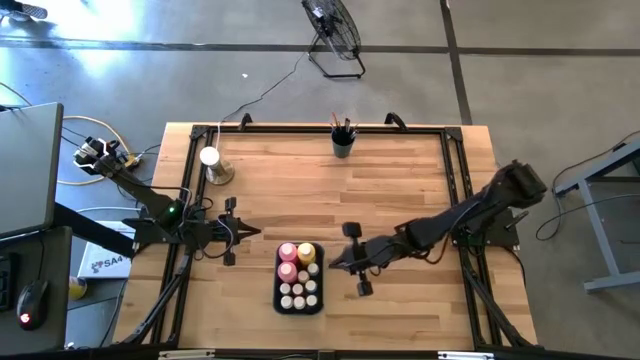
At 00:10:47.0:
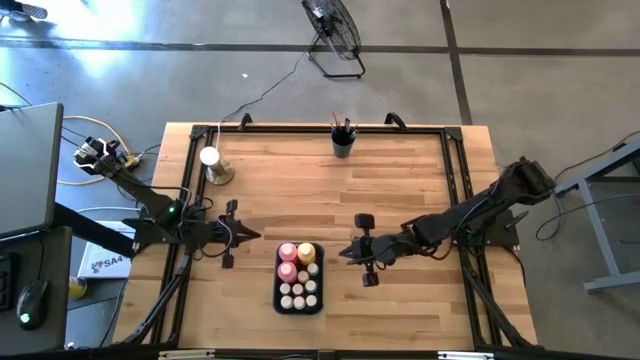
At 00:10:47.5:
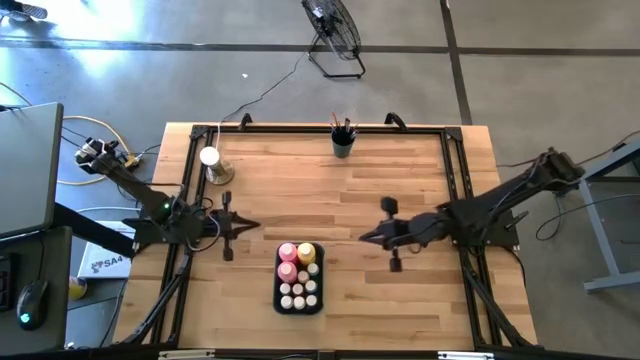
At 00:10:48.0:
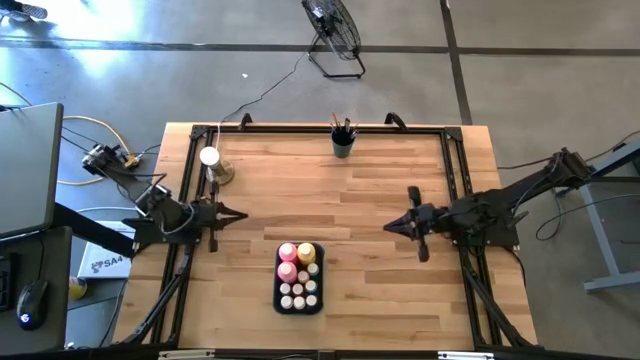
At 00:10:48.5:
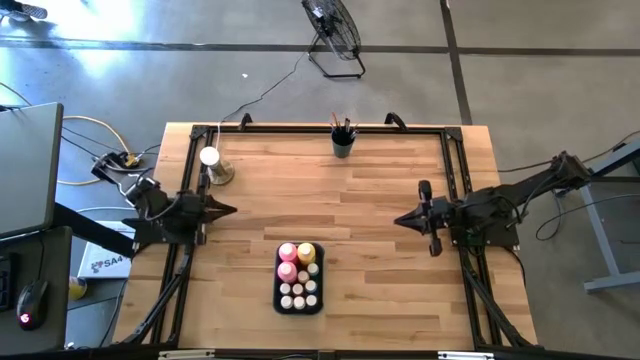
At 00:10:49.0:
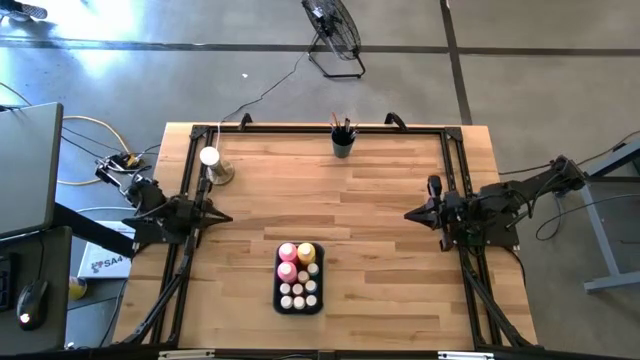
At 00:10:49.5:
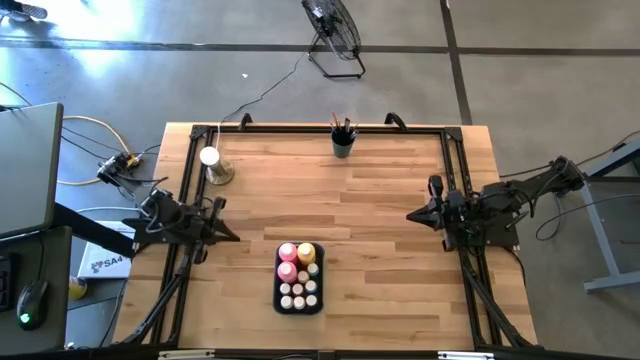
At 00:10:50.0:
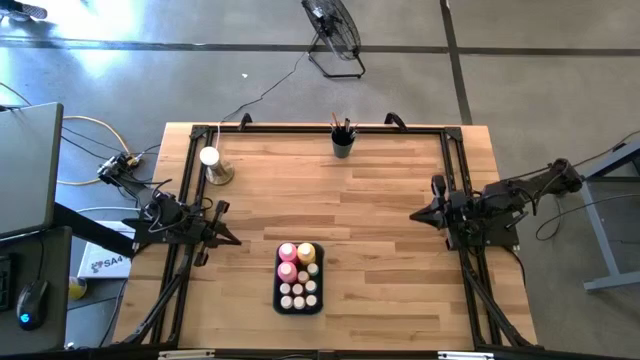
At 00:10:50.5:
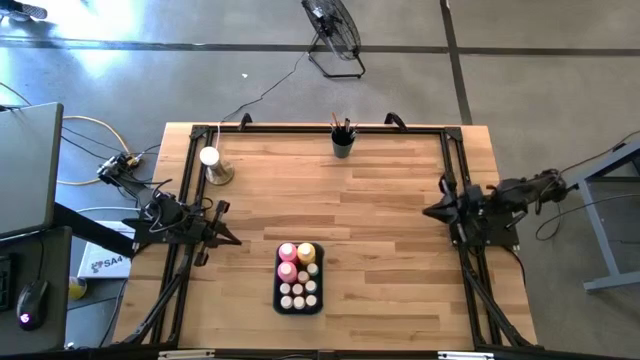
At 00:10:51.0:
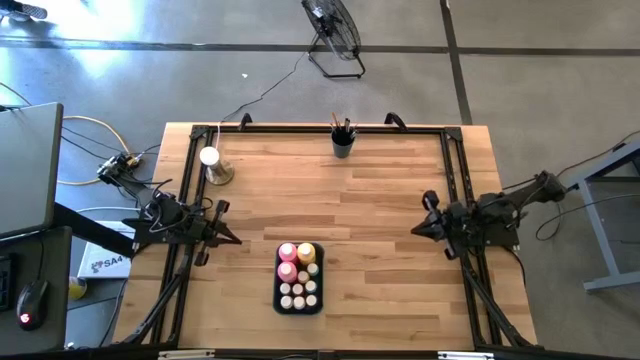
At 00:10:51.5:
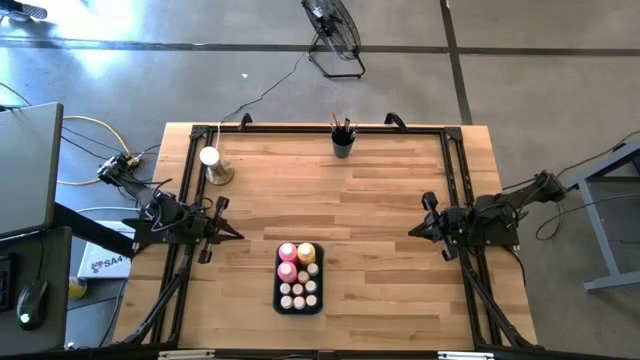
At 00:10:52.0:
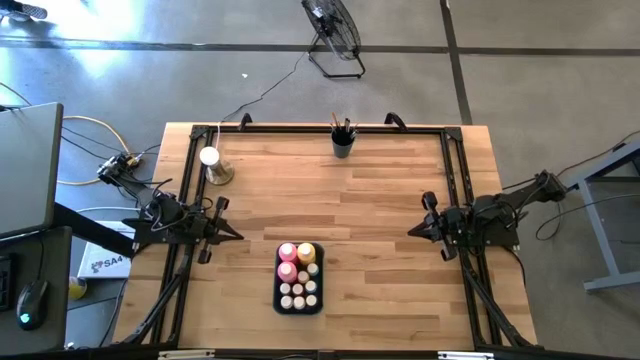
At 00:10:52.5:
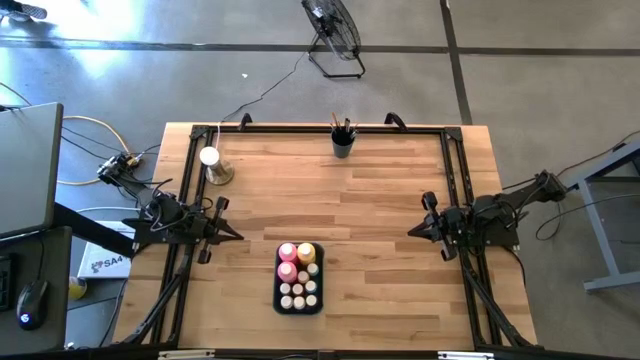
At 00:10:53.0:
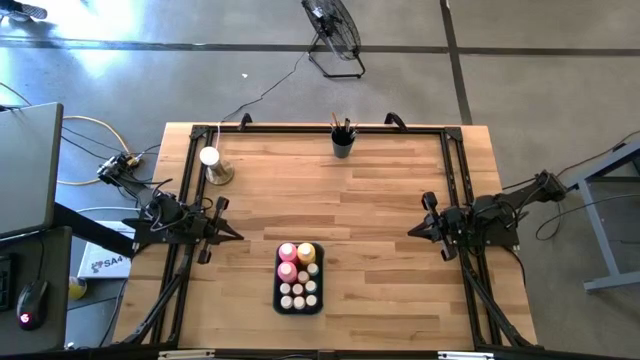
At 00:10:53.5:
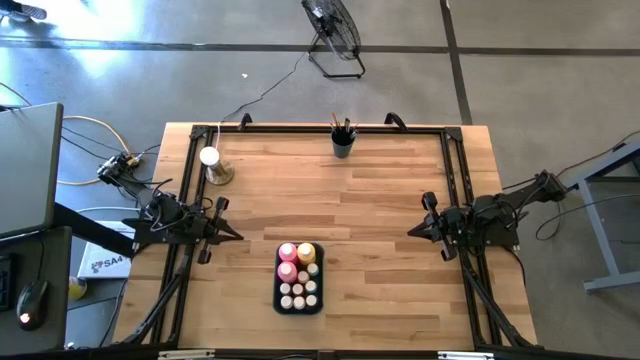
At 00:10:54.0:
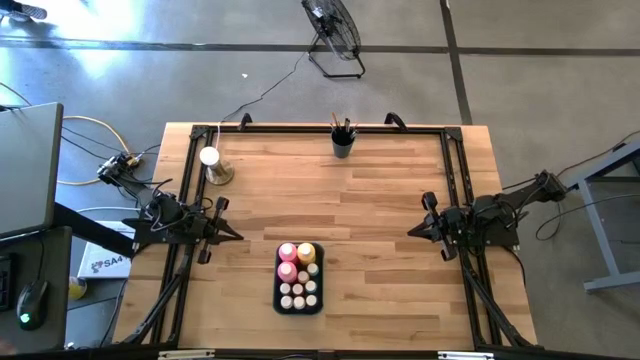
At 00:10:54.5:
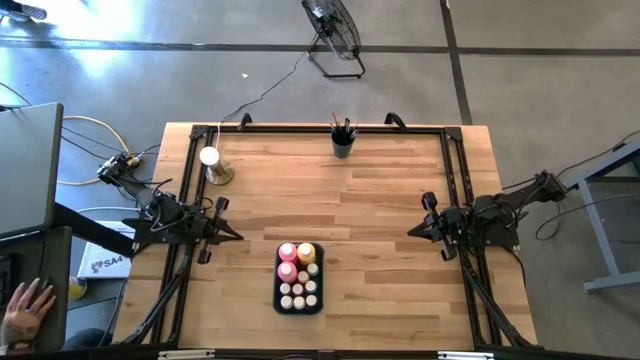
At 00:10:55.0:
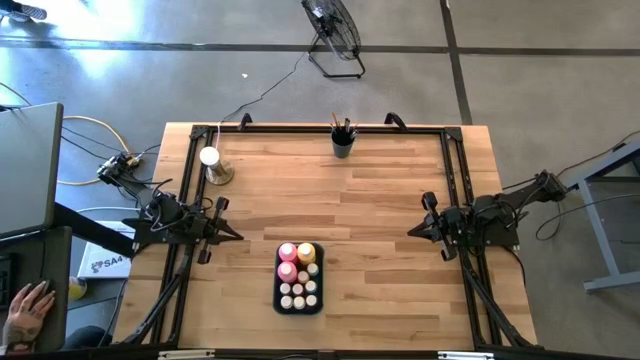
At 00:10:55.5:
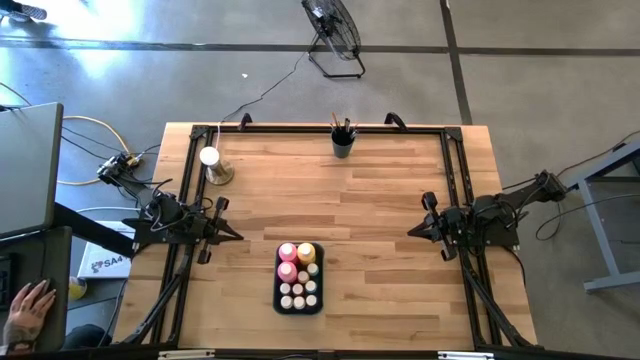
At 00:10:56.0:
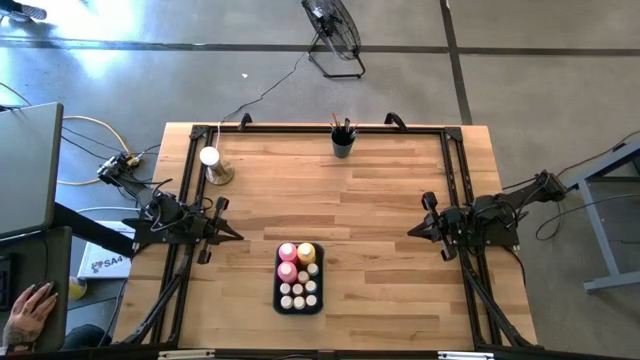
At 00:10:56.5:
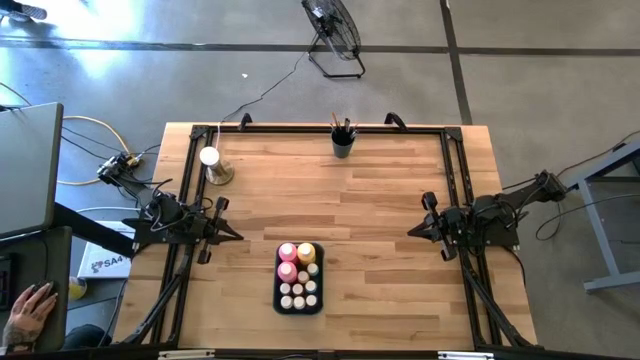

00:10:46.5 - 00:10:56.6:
Task: Pick & Place Paint Supplies
Return to Home Position
